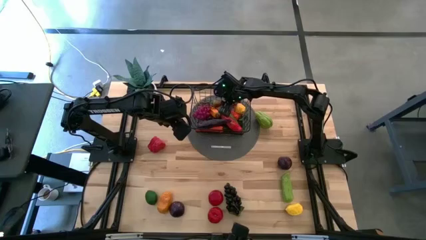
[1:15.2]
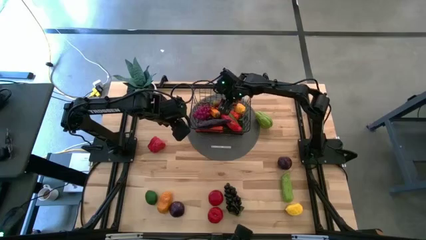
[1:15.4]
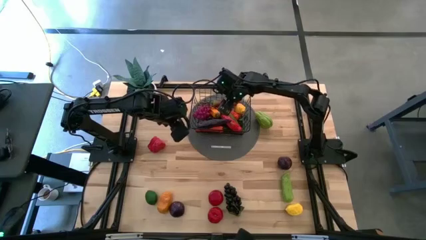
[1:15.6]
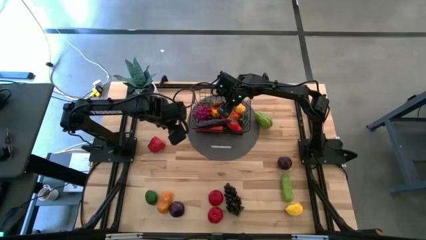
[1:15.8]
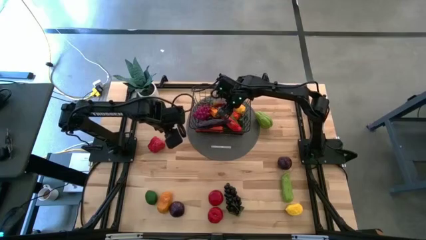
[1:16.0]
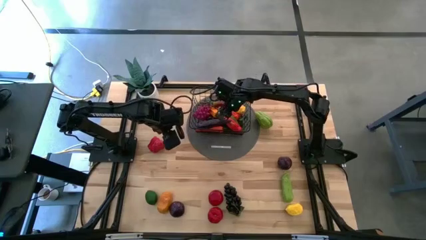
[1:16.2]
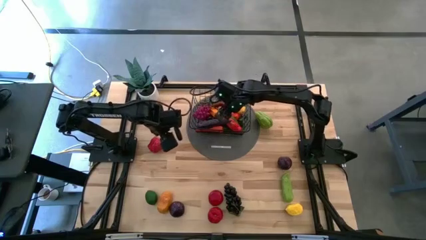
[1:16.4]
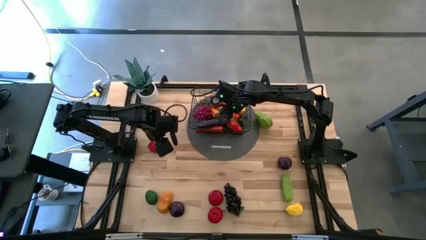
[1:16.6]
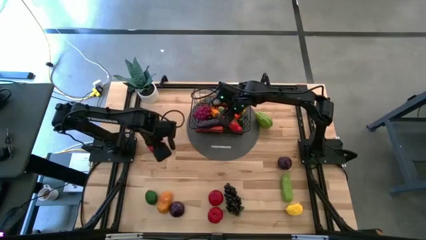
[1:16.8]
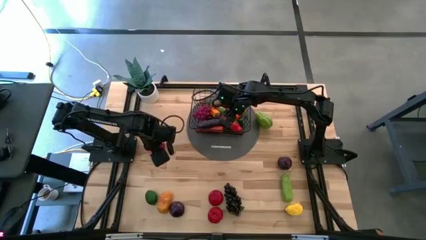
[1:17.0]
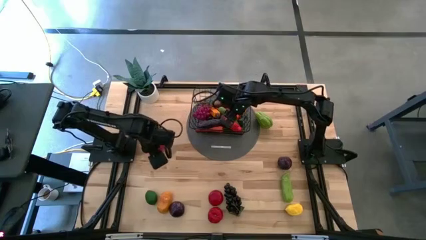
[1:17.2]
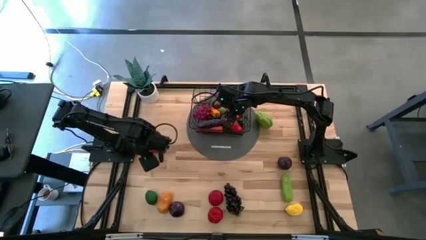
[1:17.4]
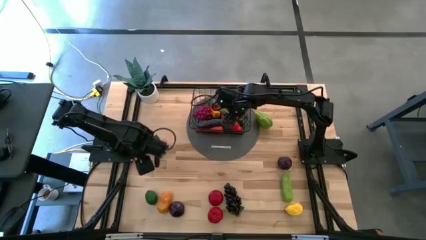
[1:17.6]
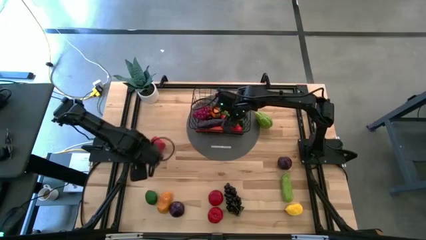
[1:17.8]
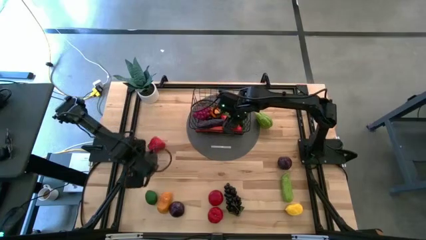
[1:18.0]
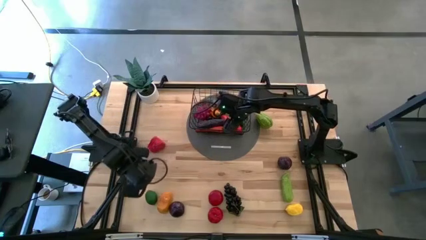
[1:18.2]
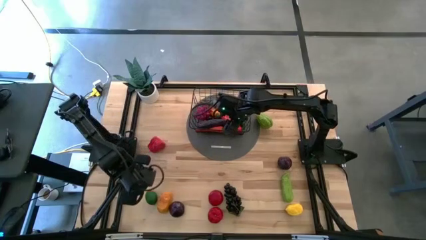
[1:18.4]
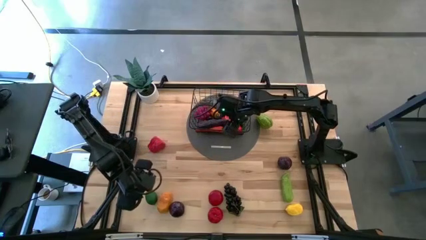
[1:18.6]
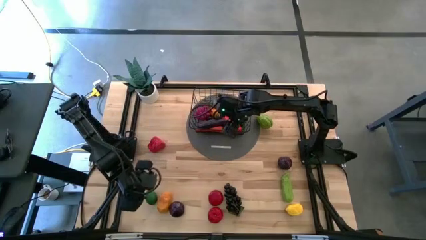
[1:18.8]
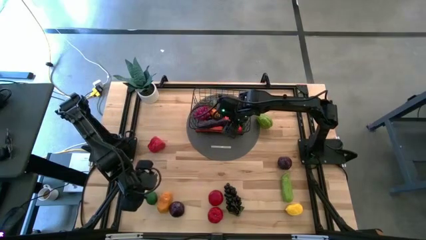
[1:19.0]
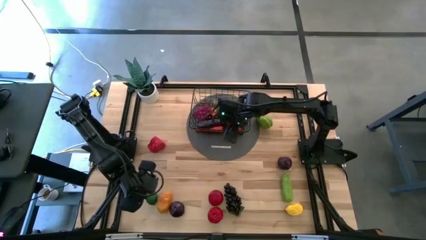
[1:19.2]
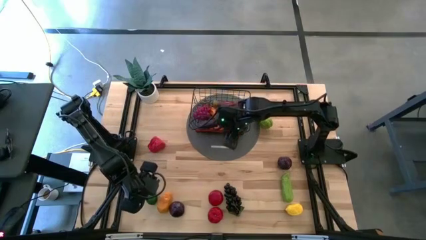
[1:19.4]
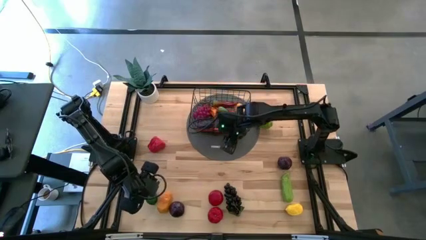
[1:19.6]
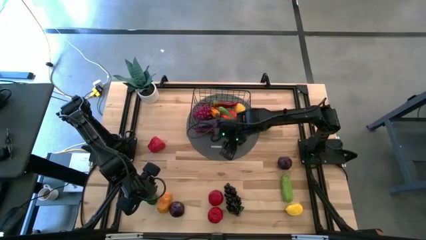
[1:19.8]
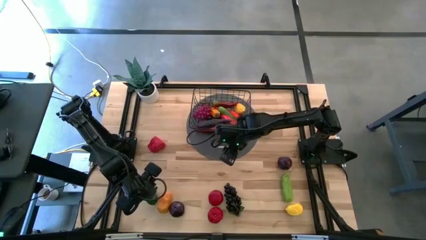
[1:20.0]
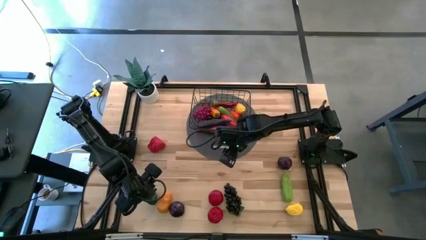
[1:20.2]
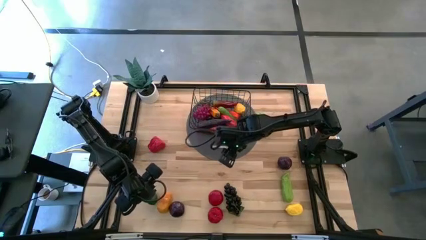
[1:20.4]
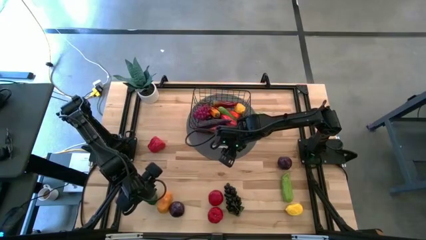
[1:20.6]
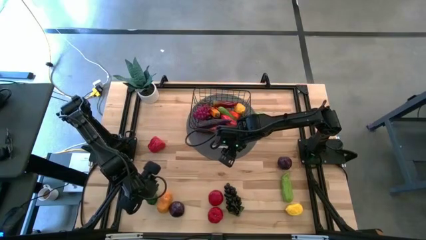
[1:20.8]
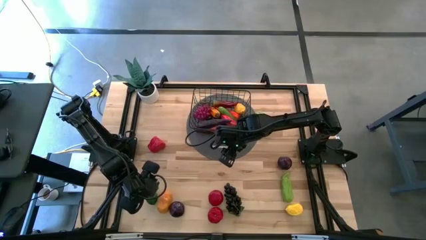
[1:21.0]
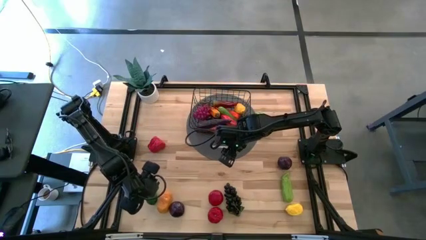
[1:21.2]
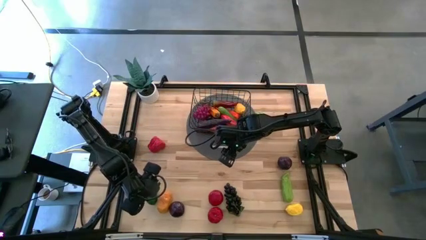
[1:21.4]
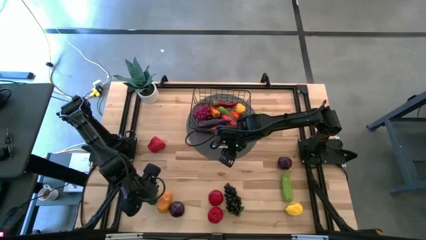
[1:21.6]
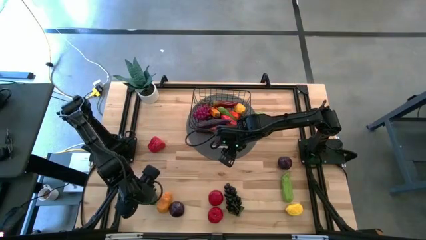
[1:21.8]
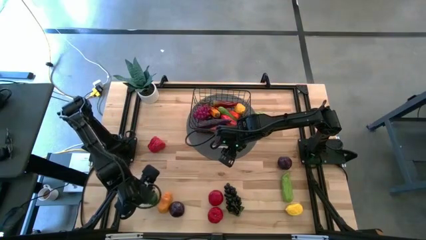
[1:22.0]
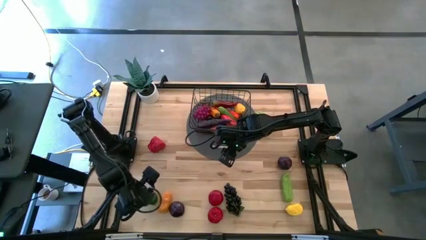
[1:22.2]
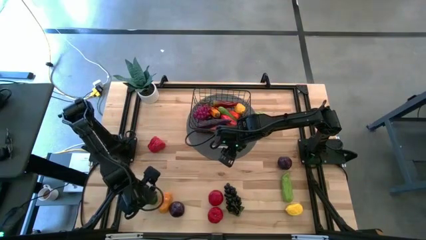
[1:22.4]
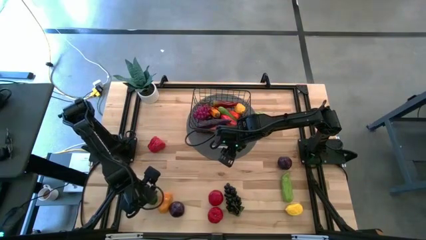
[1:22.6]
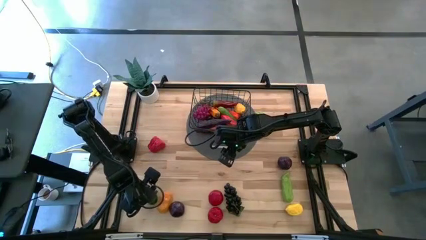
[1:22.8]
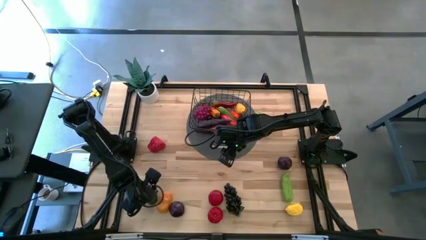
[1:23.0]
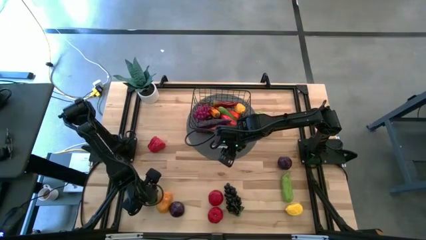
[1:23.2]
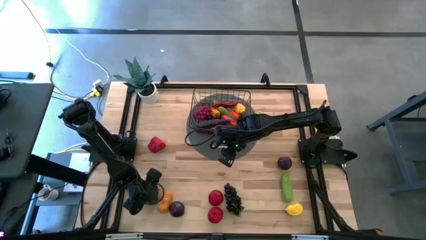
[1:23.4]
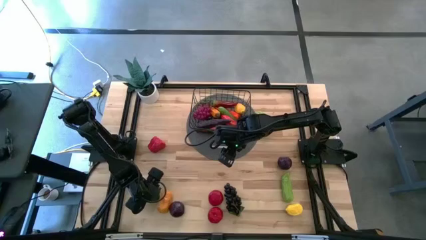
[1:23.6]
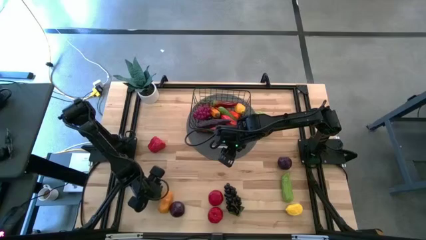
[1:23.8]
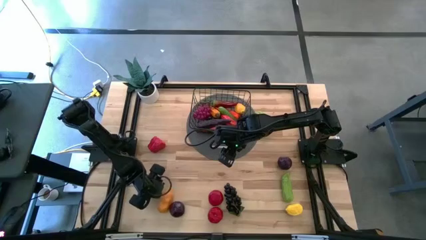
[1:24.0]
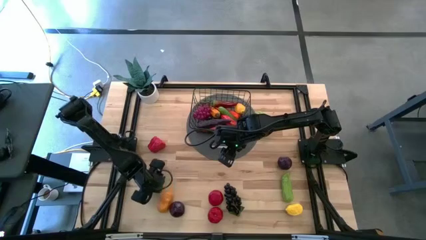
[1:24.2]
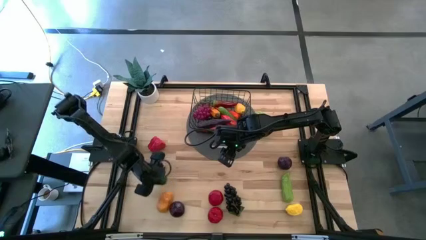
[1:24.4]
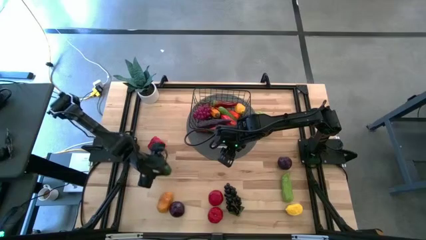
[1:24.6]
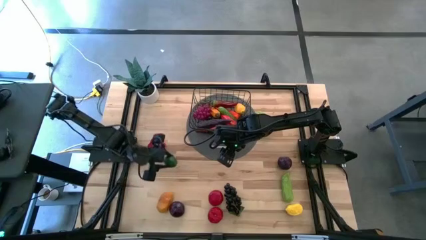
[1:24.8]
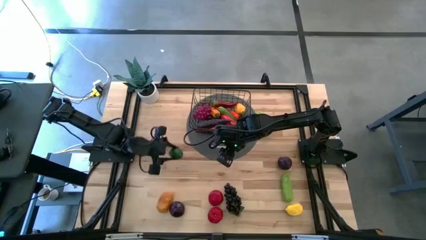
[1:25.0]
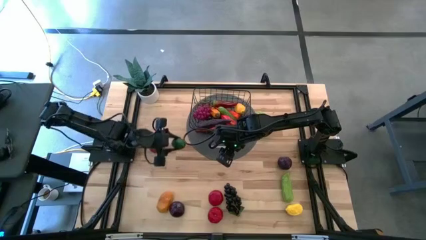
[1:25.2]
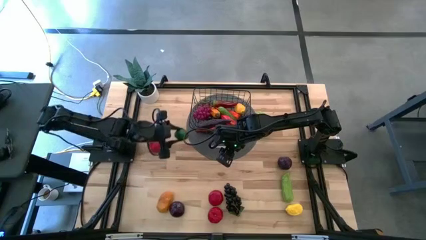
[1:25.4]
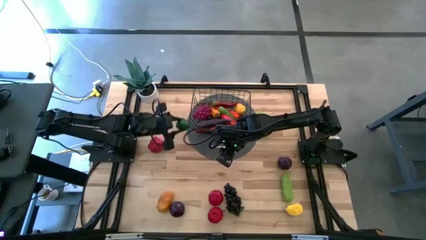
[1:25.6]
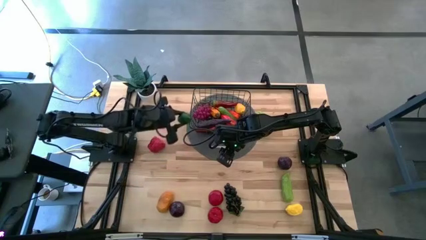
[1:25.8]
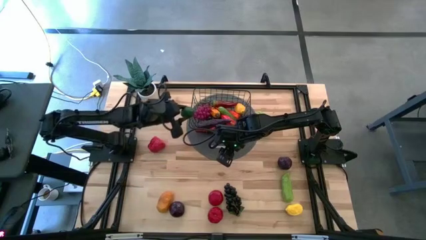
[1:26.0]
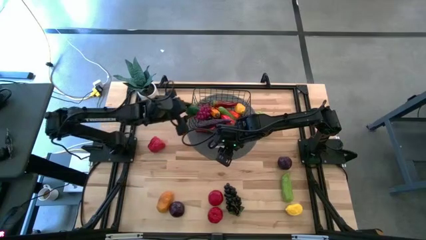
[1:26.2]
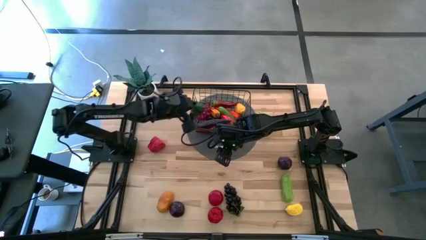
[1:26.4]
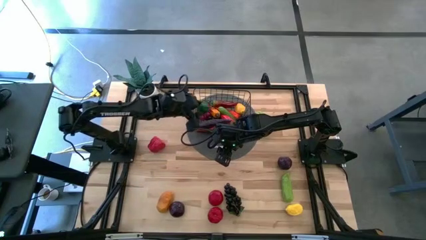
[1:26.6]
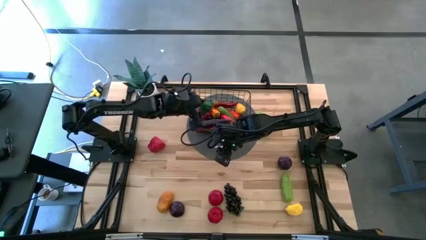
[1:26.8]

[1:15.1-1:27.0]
Task: Build produce basket
Put the green lime into the wire basket
